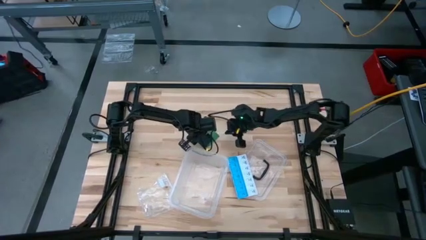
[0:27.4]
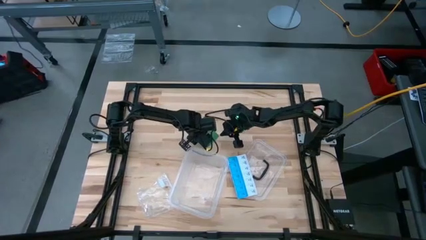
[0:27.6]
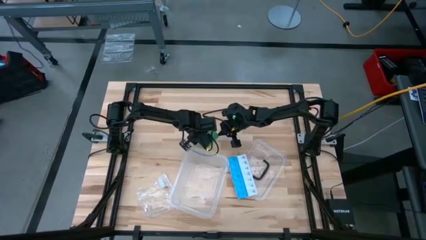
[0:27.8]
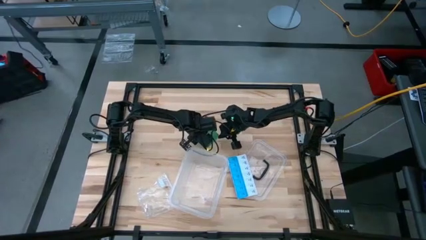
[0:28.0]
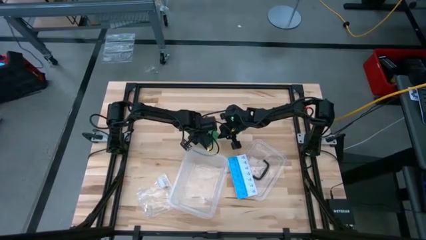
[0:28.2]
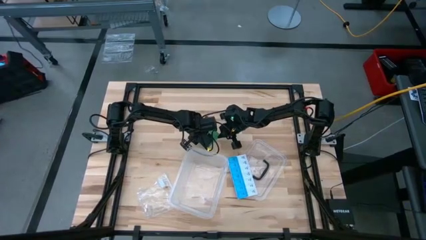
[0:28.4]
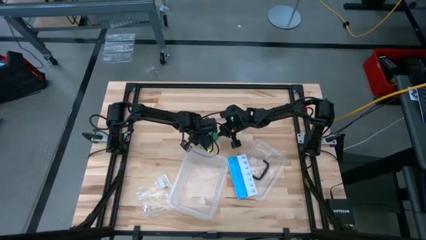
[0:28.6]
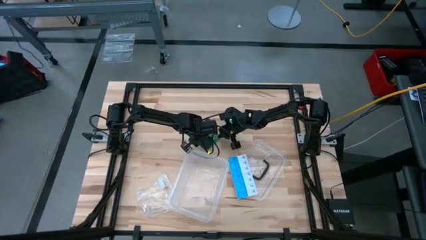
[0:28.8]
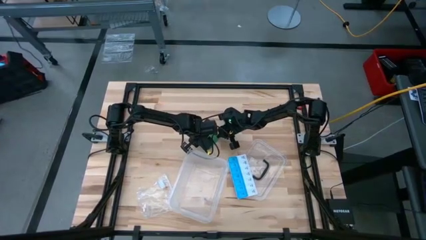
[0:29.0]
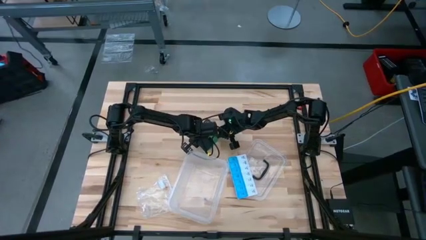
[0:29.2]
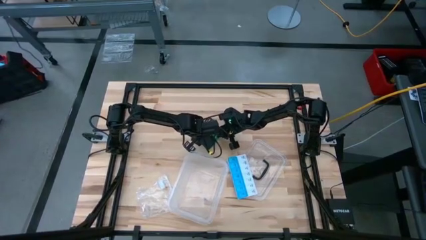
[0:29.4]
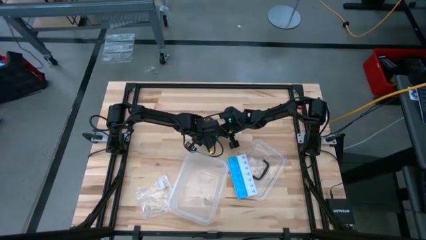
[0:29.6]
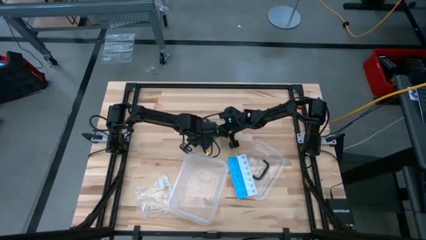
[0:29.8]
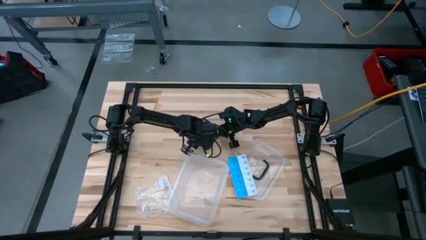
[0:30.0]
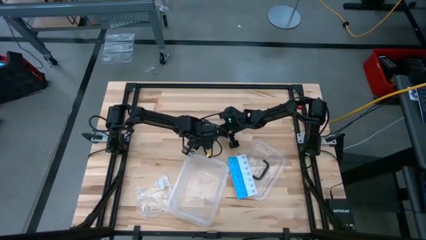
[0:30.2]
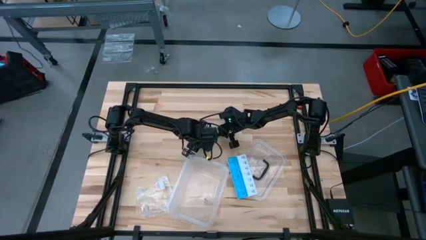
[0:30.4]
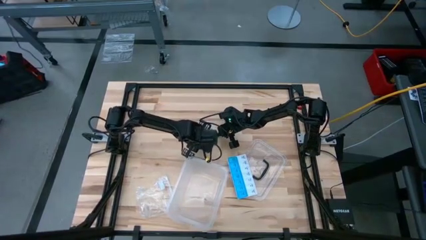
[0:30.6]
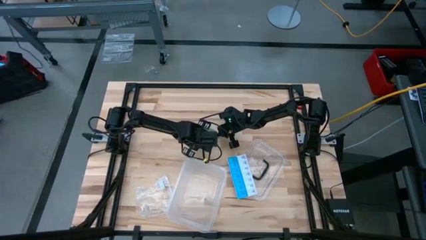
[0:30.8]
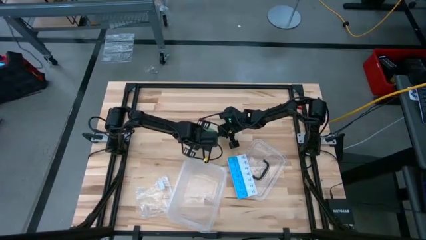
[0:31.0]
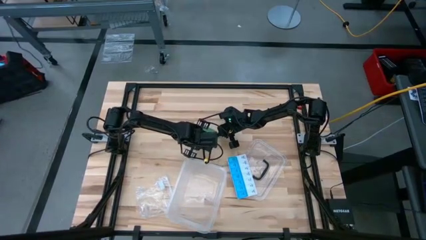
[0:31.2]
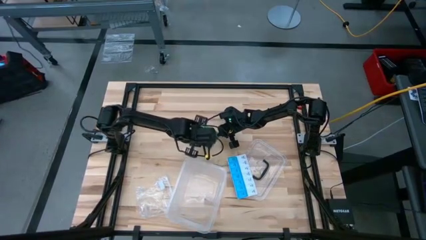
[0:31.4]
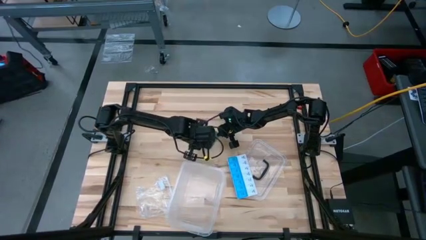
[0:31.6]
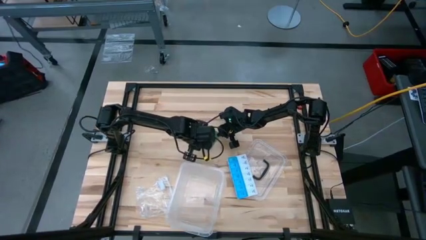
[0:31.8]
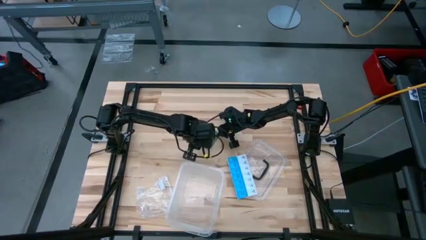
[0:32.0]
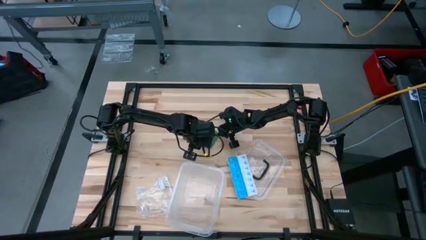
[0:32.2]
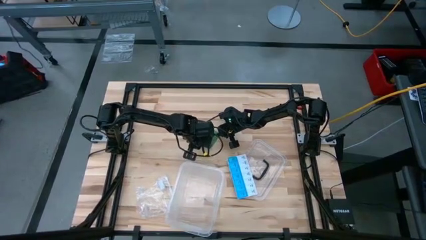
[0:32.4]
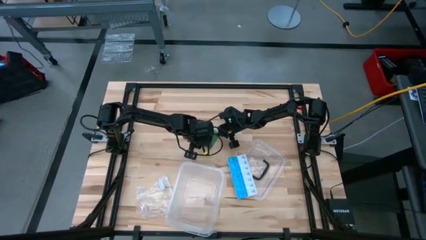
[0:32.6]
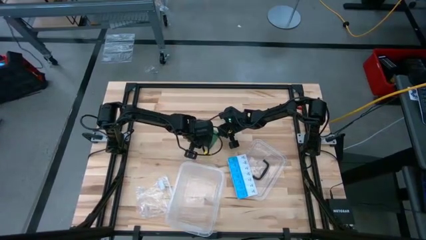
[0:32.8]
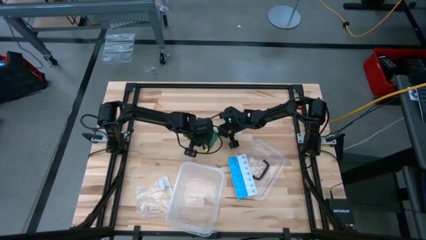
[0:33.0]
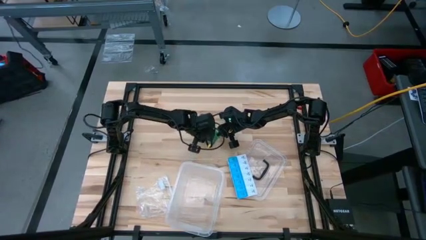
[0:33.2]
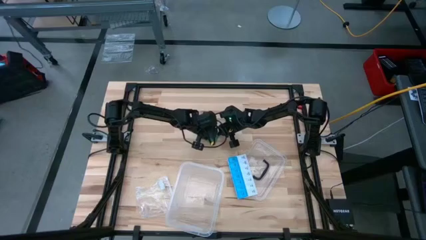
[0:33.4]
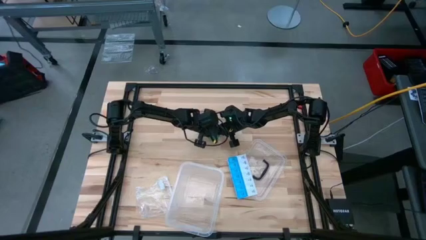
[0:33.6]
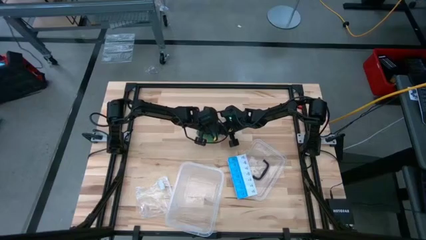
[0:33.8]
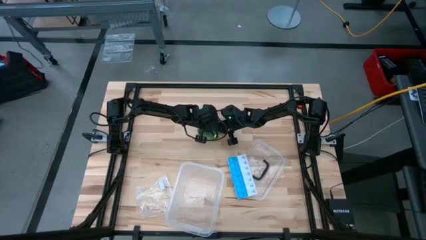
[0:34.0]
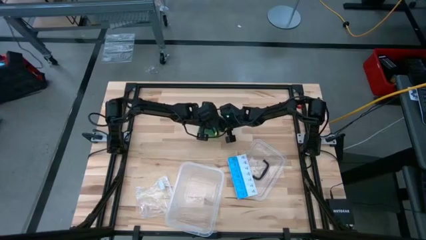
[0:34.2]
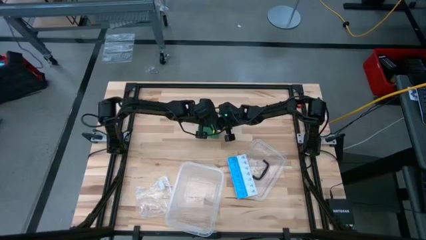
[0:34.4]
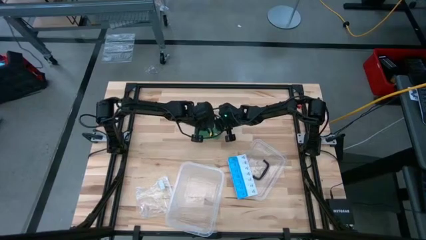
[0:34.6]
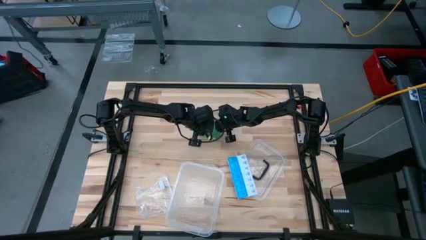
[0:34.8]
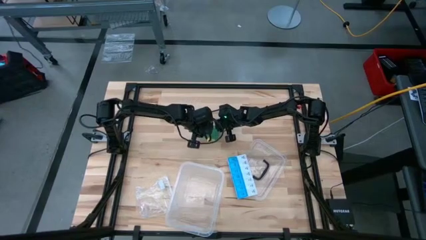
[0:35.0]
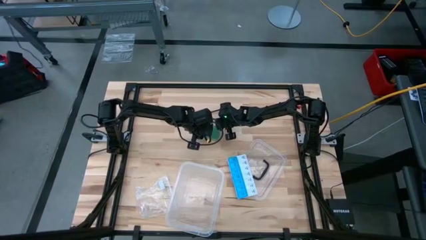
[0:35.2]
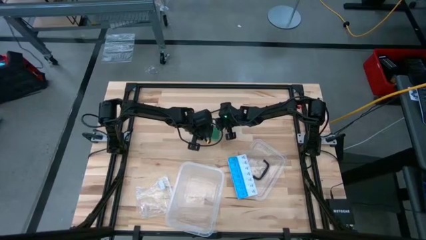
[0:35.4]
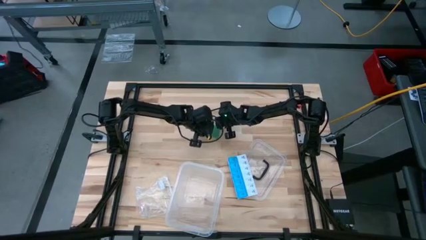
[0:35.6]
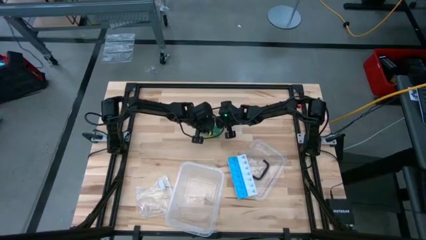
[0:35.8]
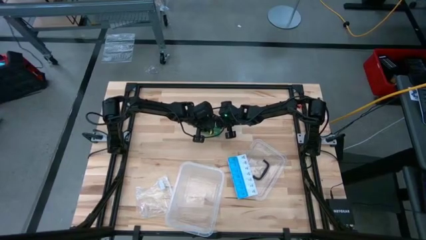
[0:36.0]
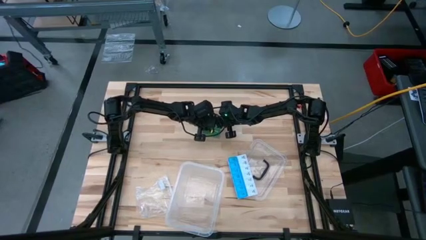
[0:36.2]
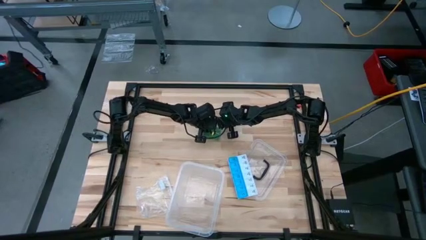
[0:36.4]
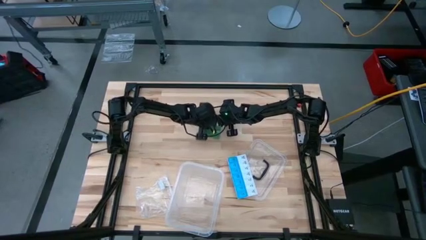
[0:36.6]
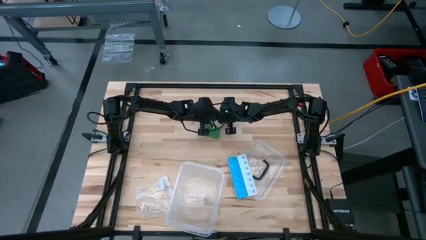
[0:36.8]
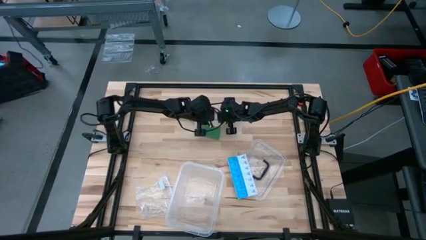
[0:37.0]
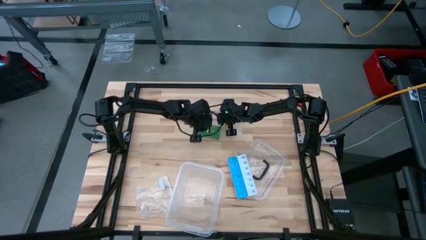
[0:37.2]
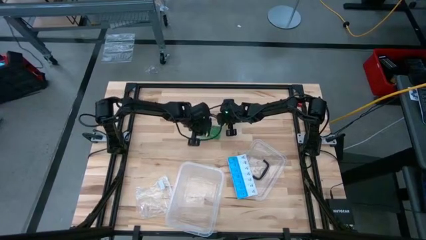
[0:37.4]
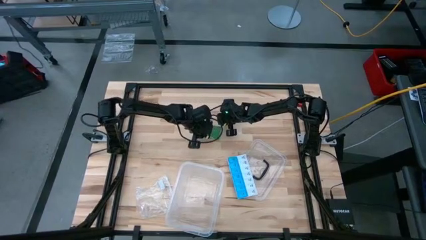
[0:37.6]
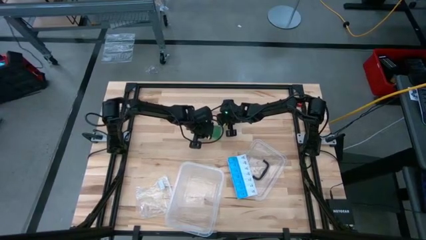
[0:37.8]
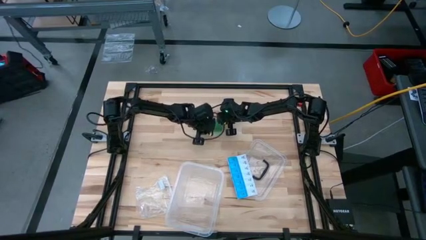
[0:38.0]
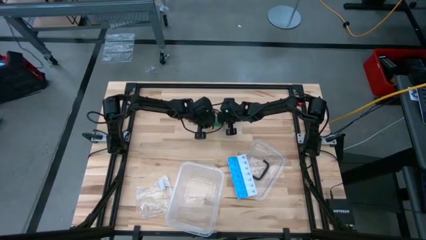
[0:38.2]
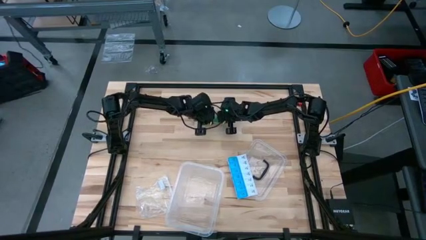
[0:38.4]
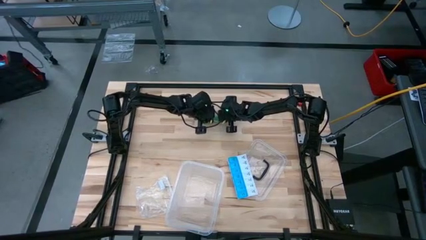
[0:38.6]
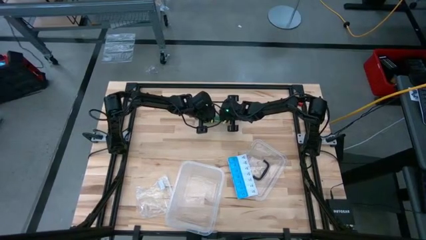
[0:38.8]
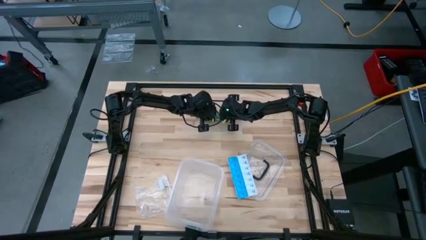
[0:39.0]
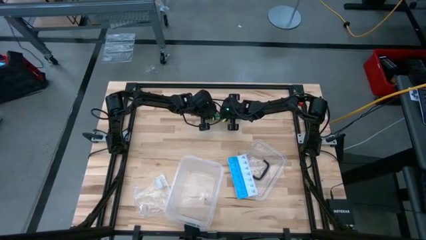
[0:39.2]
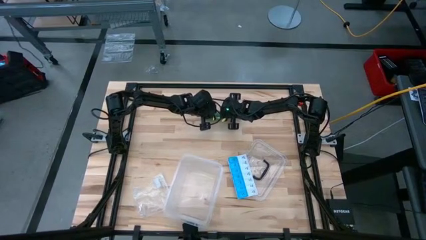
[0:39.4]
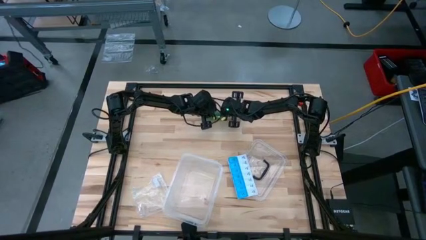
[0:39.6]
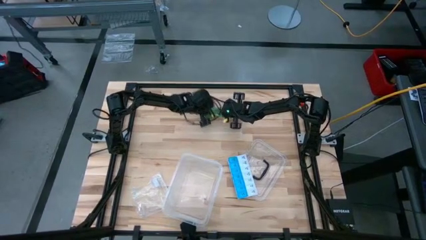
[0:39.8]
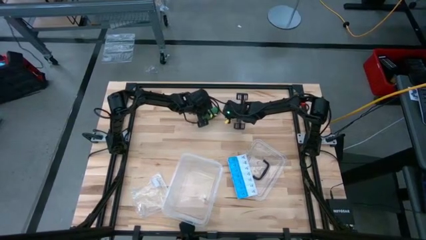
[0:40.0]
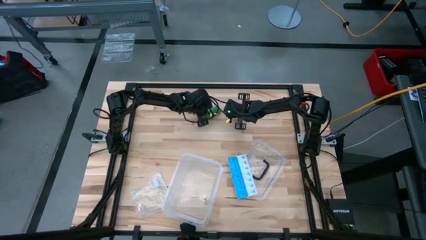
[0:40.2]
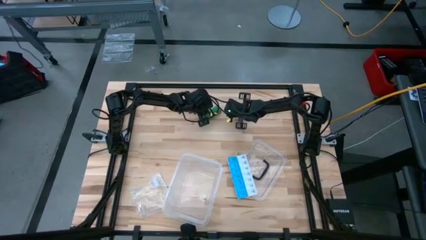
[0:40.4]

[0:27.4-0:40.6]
Task: Roll bandage
Roll the green bandage
